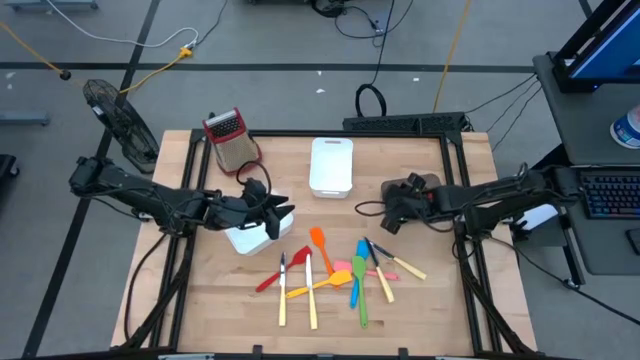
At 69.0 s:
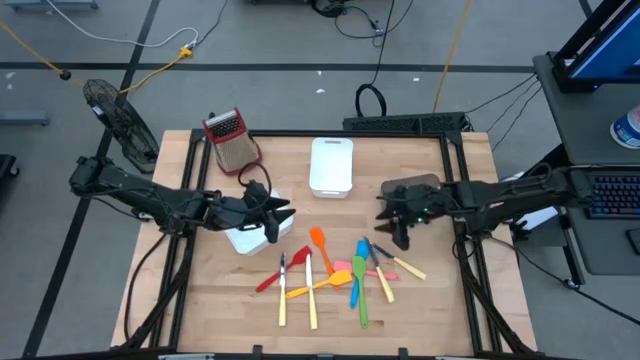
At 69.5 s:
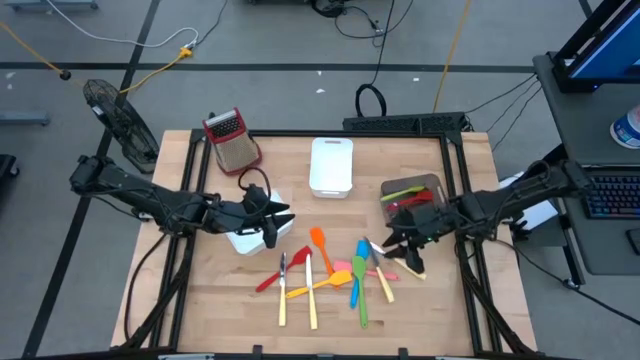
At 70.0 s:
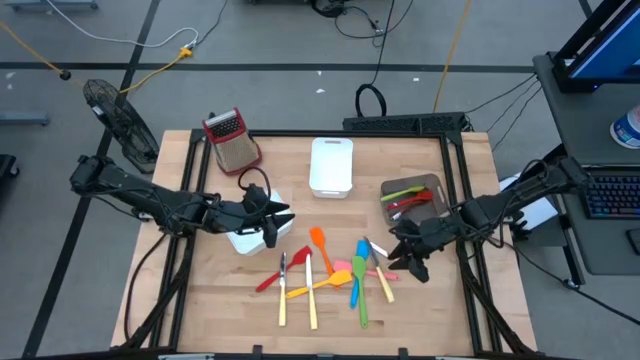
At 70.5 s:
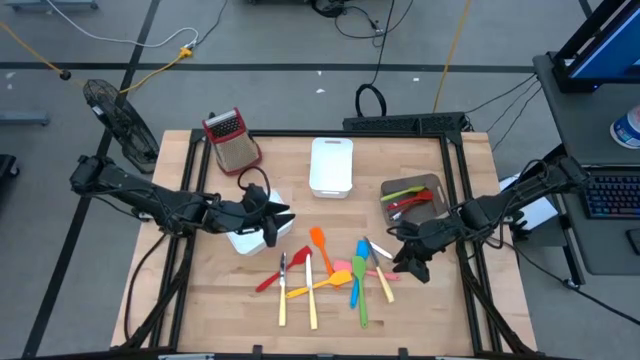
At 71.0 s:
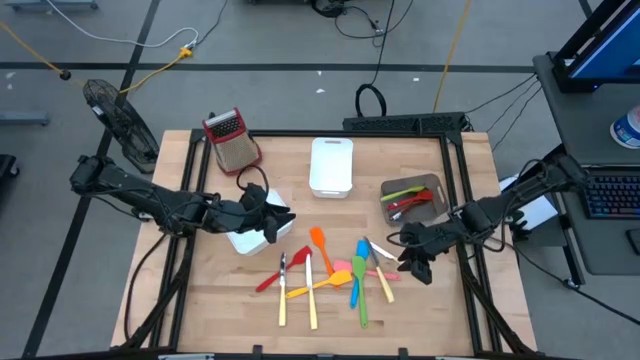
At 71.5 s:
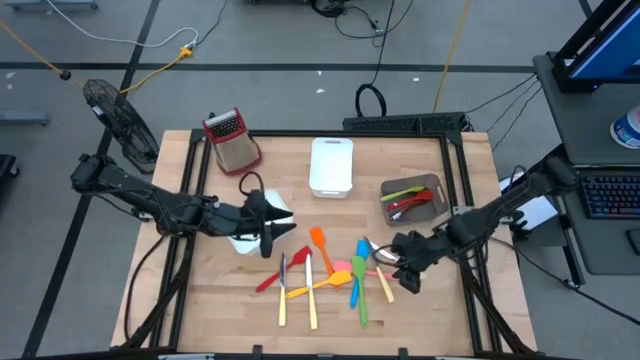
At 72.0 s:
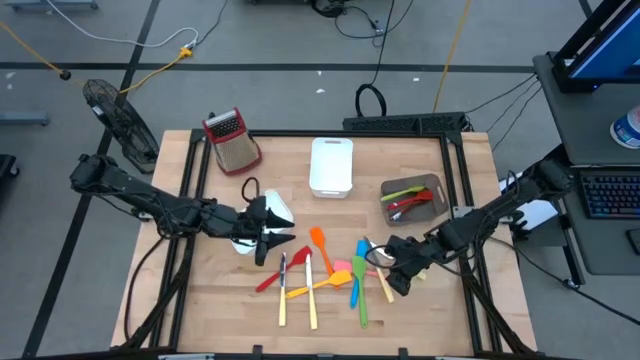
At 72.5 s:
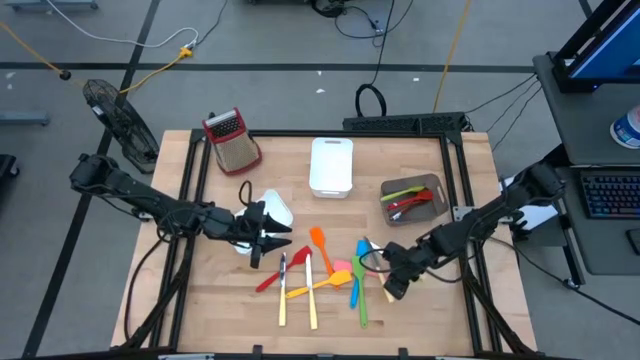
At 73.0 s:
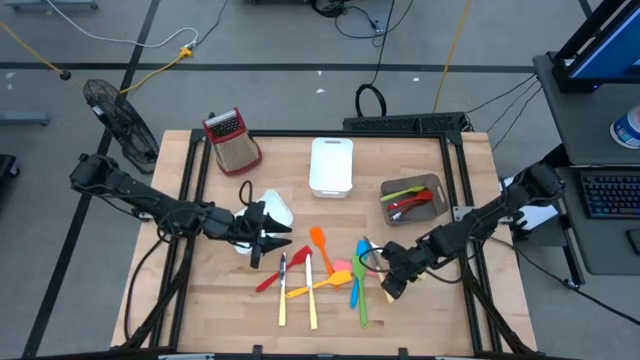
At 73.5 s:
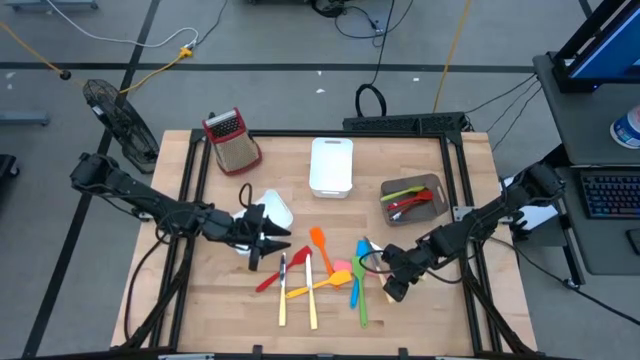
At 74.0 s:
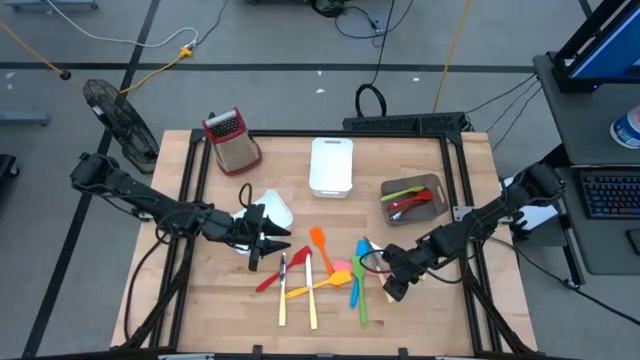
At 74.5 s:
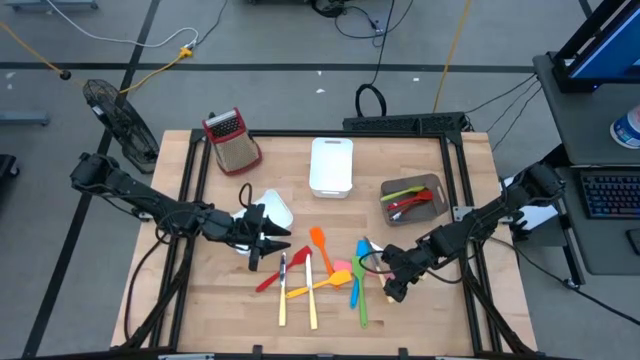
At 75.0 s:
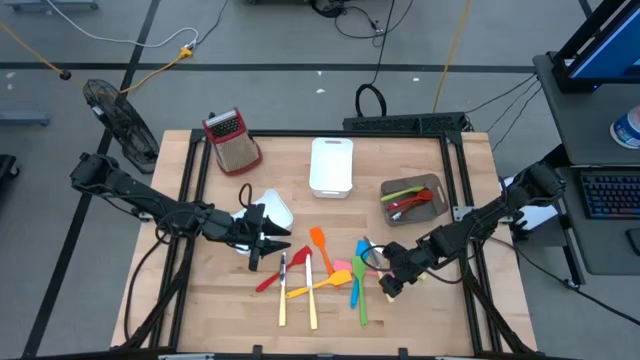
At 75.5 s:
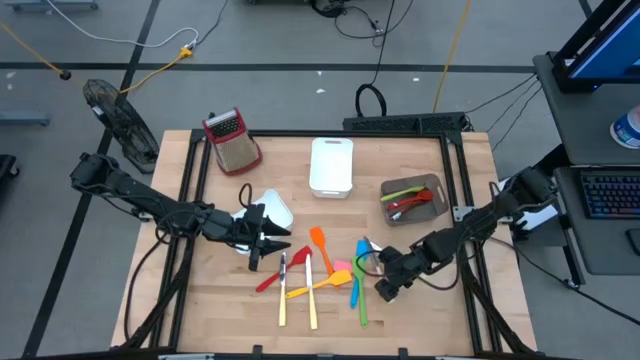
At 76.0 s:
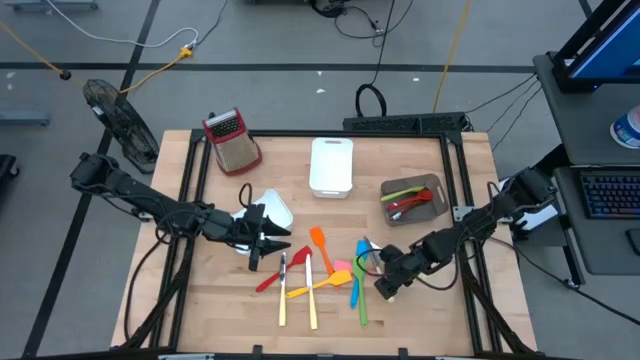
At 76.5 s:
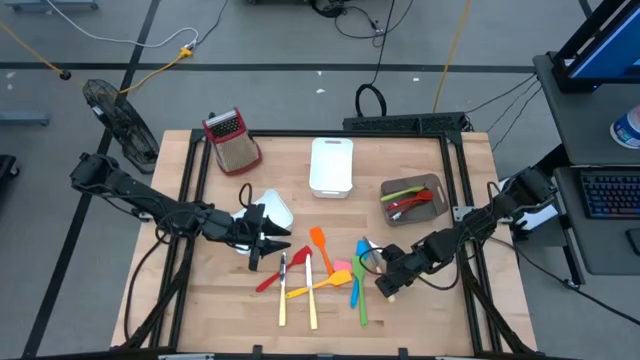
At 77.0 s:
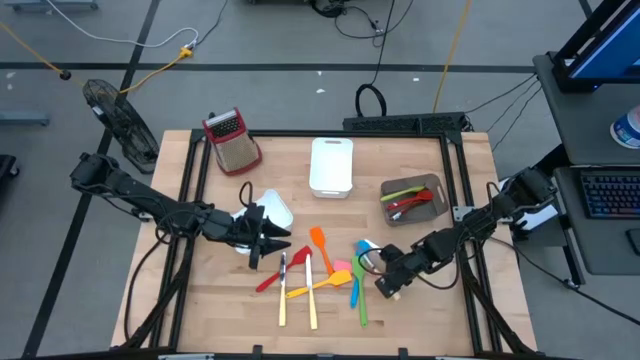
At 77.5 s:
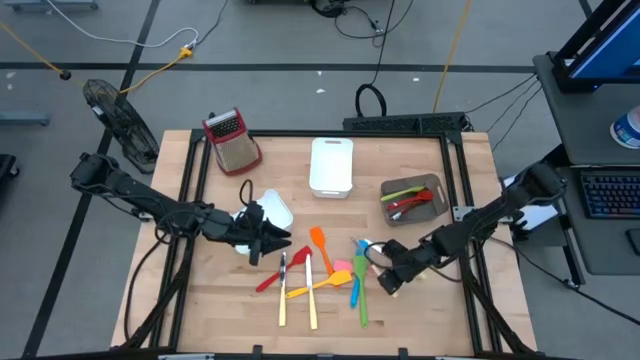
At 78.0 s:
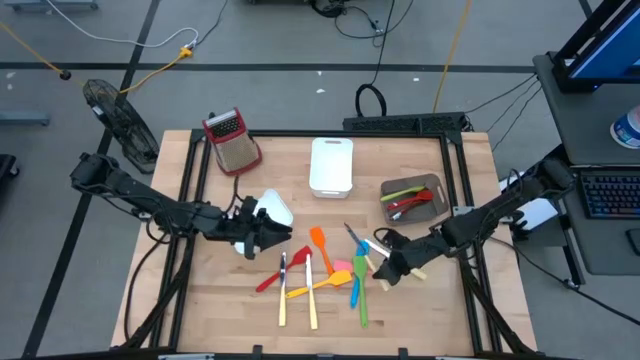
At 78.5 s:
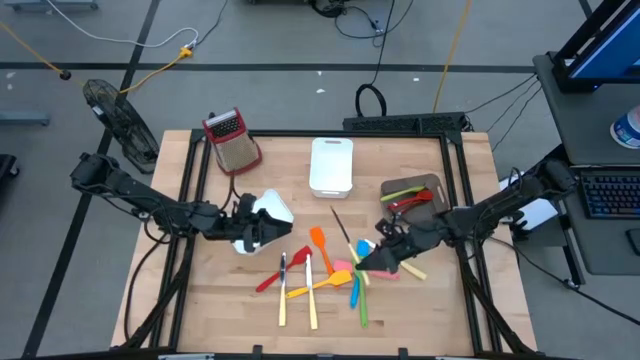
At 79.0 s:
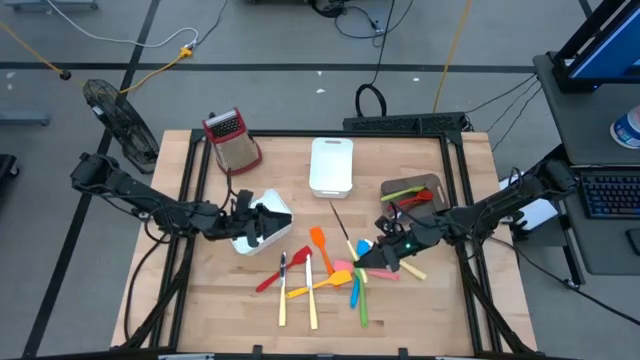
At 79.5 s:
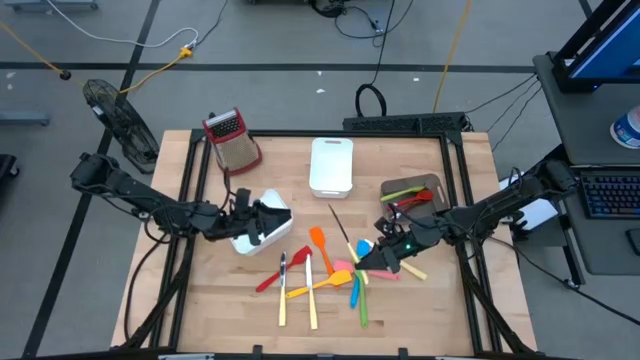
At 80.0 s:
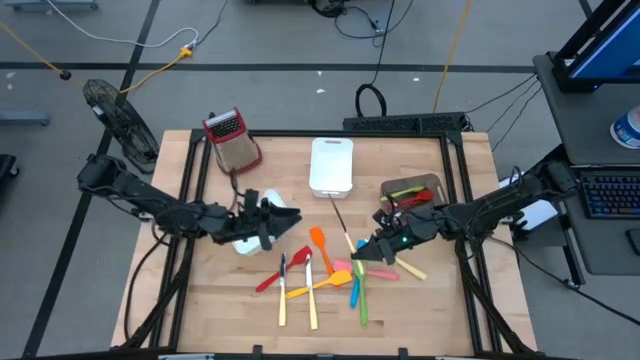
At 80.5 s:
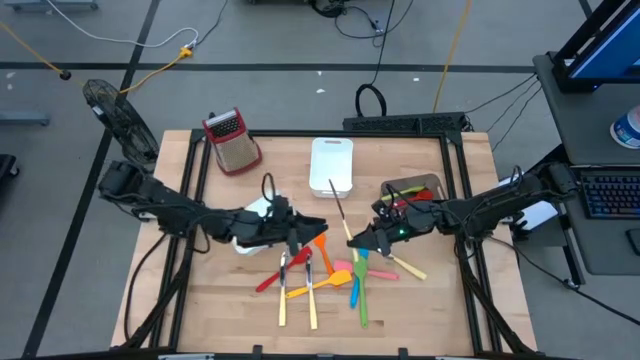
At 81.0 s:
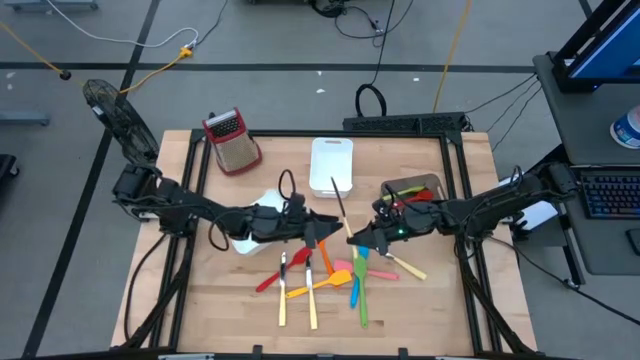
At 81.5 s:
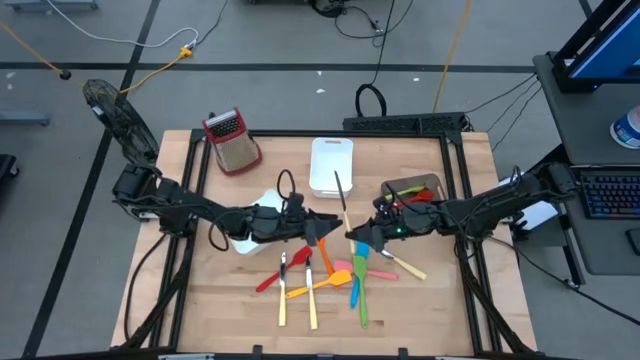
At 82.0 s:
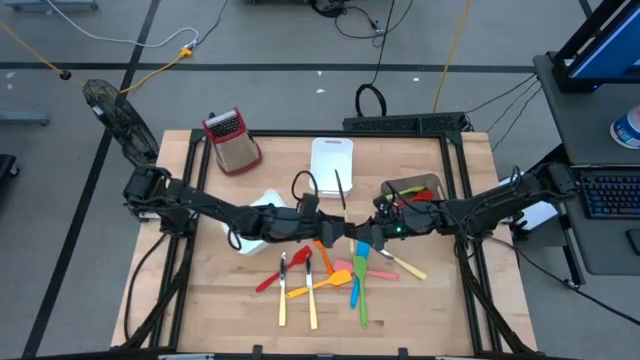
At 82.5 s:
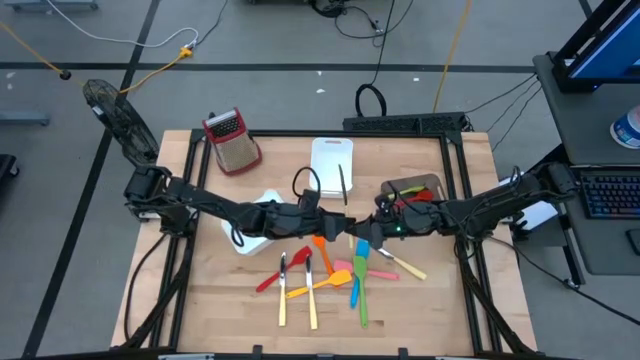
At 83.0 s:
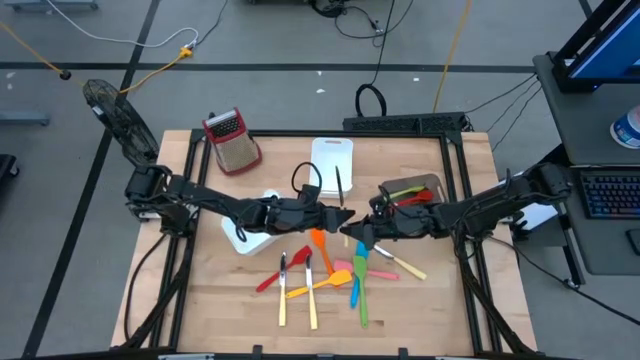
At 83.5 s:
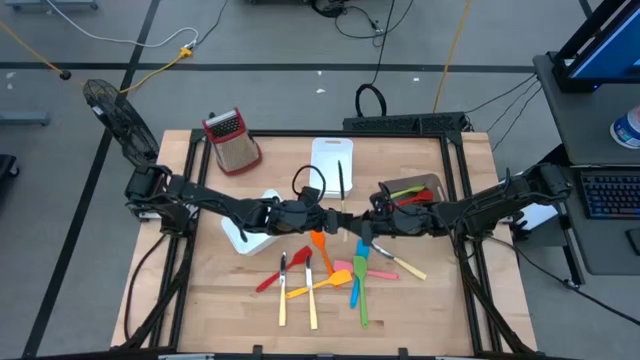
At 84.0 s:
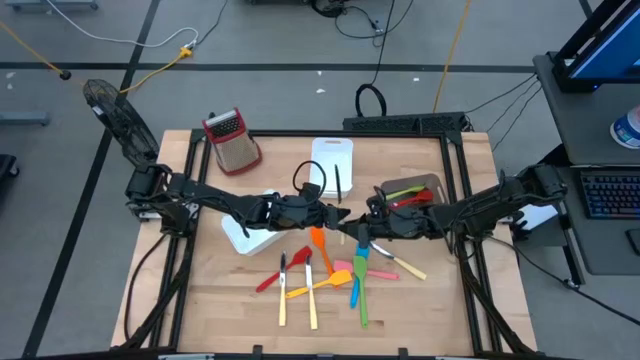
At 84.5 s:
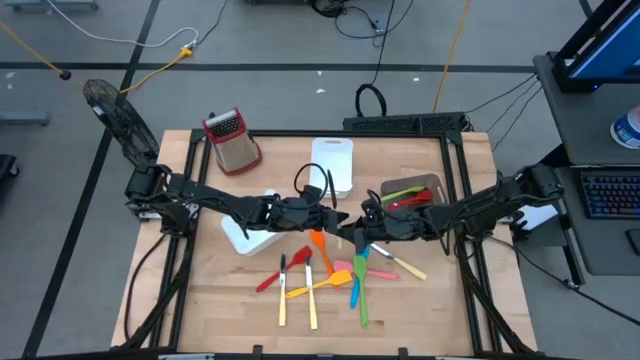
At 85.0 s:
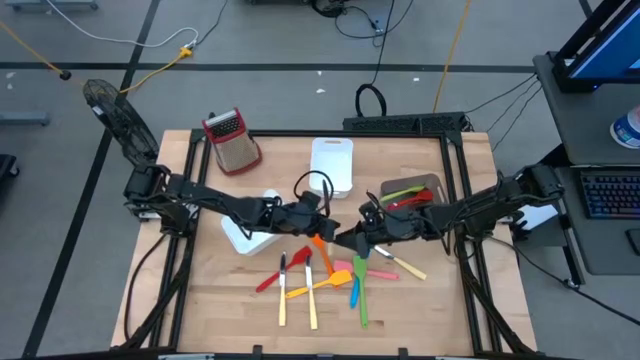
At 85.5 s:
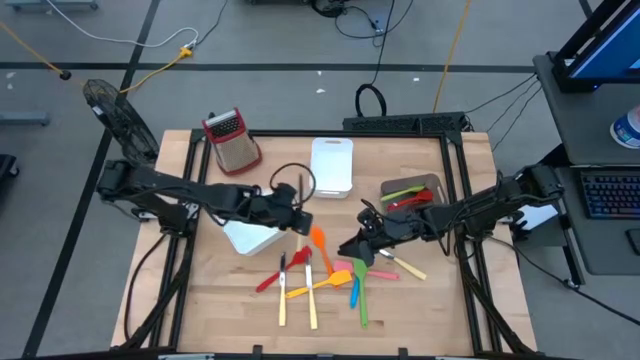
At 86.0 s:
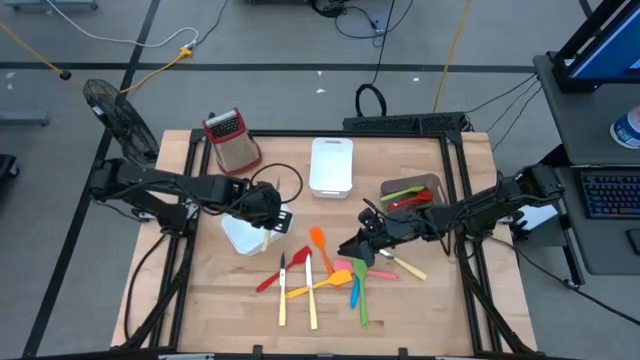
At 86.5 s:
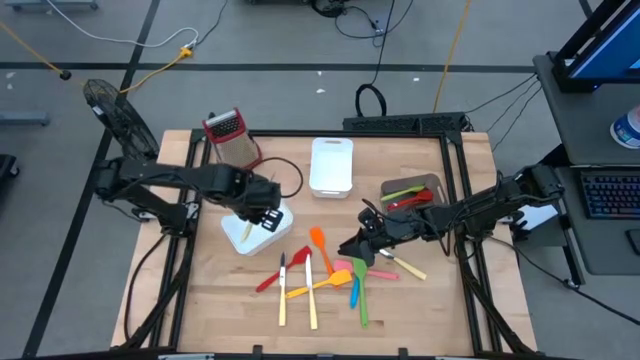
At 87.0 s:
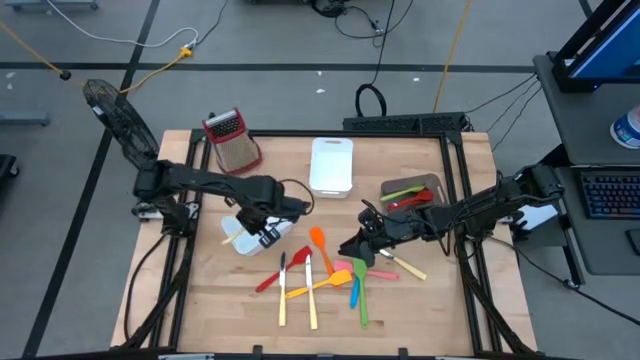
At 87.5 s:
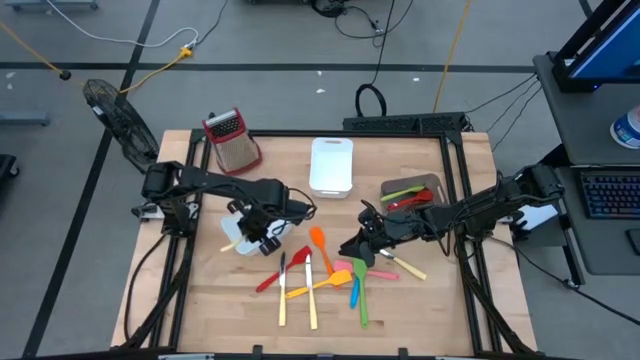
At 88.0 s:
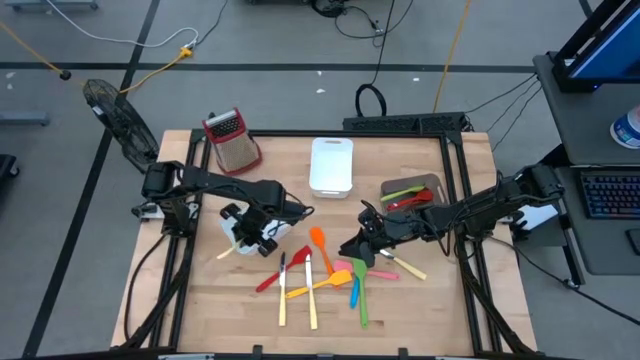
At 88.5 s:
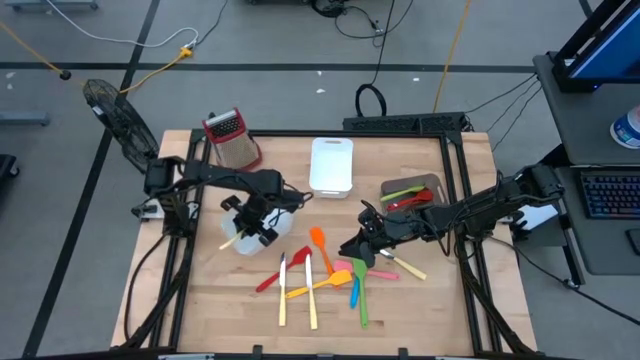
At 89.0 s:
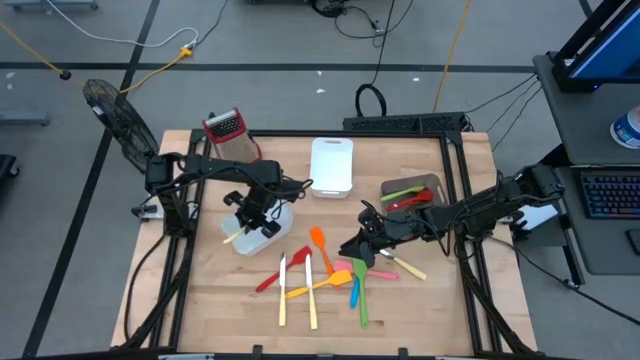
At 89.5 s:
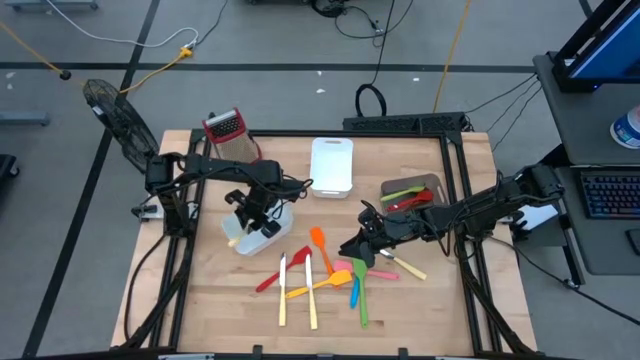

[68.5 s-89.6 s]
Task: Pick & Place Kitchen Items
Put the white table knife into the bottom white bin
